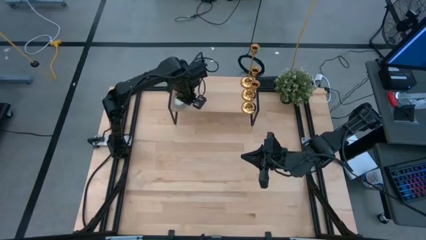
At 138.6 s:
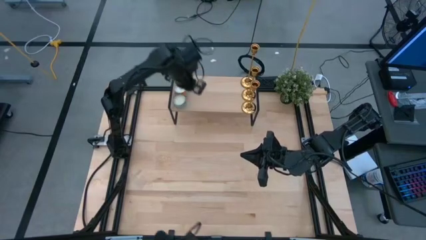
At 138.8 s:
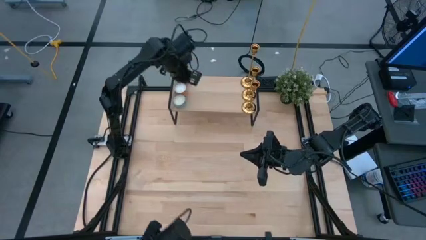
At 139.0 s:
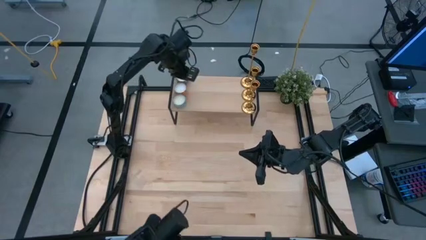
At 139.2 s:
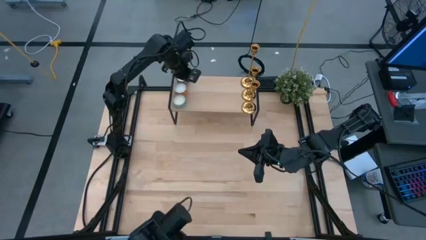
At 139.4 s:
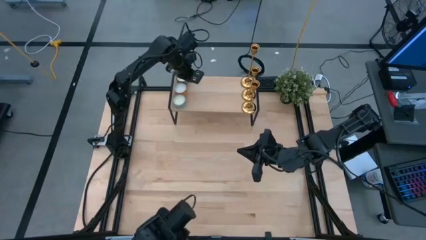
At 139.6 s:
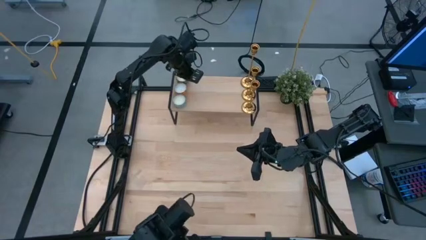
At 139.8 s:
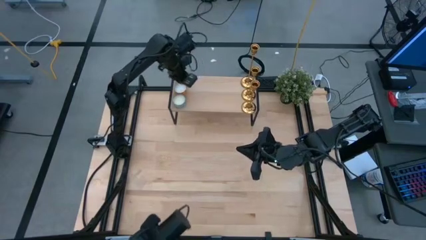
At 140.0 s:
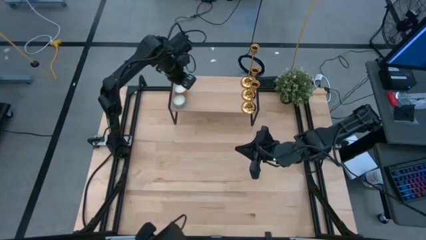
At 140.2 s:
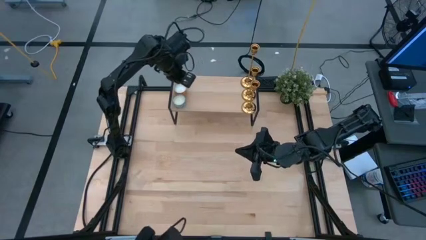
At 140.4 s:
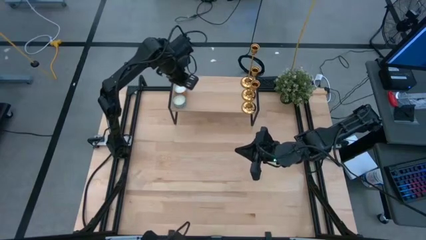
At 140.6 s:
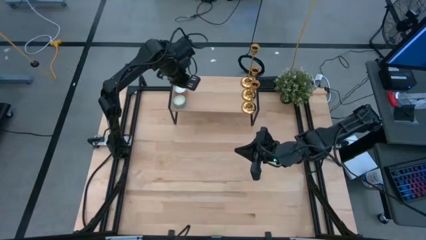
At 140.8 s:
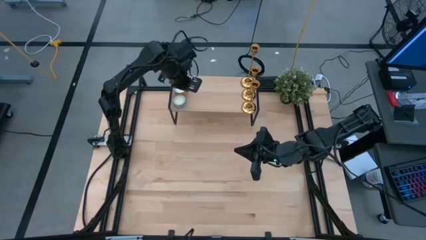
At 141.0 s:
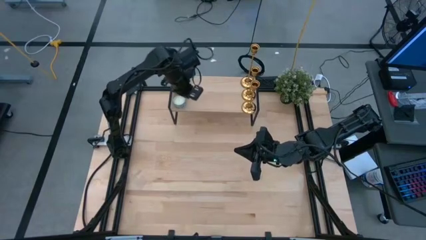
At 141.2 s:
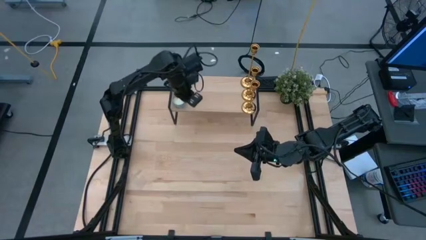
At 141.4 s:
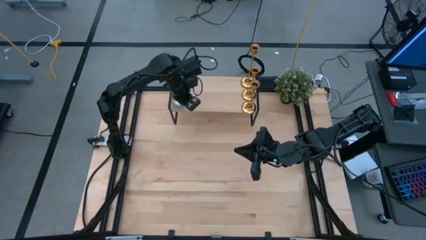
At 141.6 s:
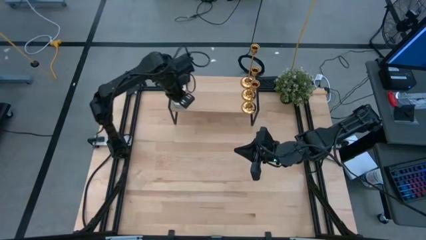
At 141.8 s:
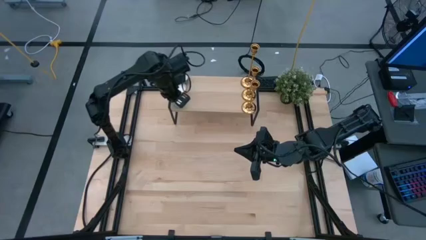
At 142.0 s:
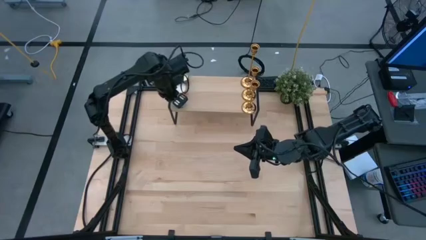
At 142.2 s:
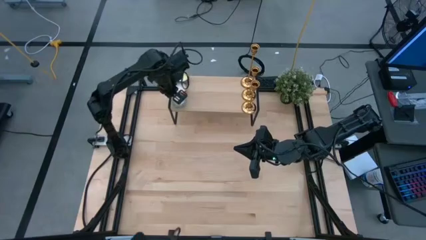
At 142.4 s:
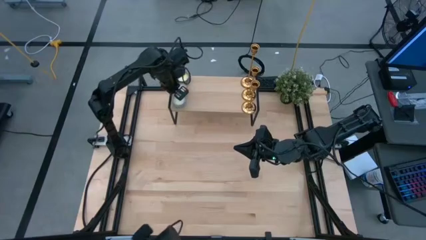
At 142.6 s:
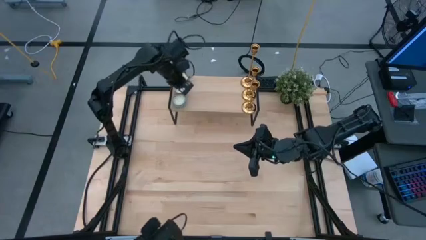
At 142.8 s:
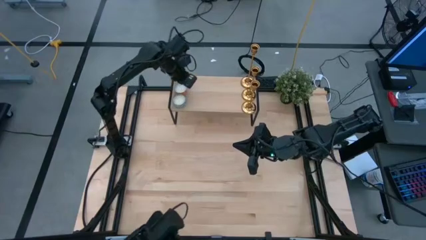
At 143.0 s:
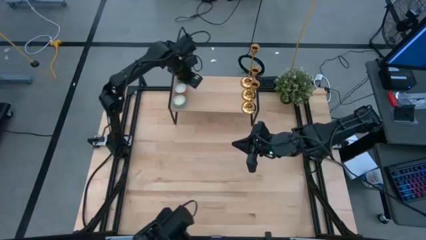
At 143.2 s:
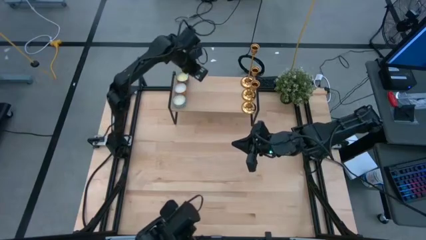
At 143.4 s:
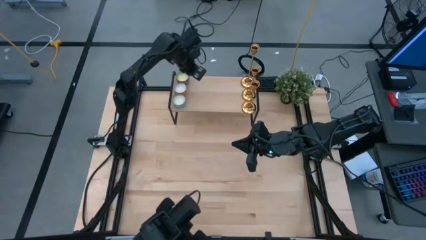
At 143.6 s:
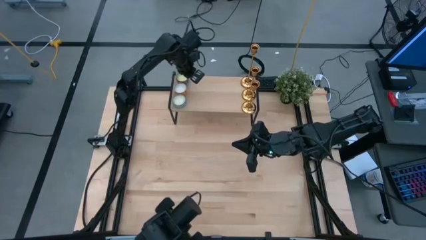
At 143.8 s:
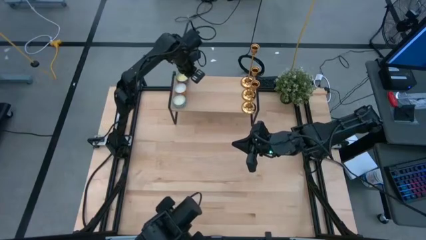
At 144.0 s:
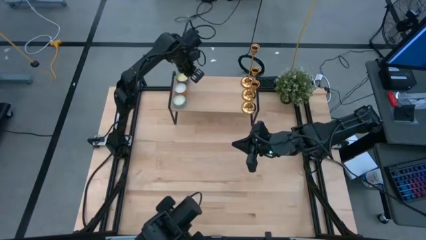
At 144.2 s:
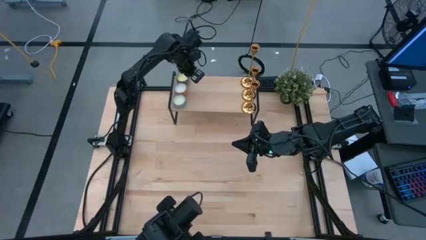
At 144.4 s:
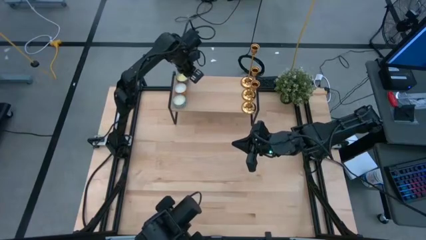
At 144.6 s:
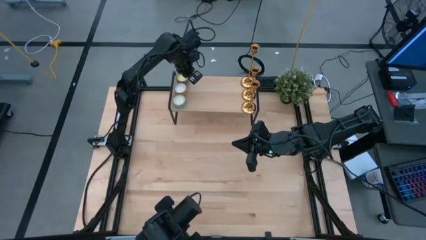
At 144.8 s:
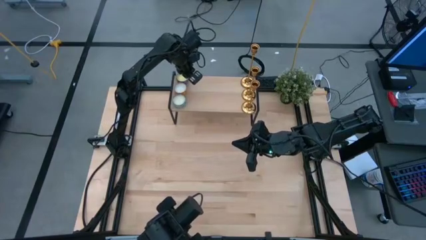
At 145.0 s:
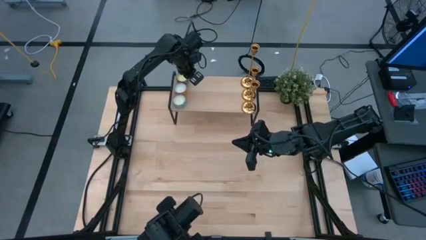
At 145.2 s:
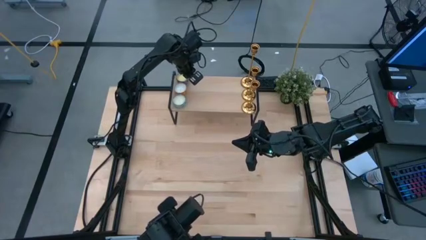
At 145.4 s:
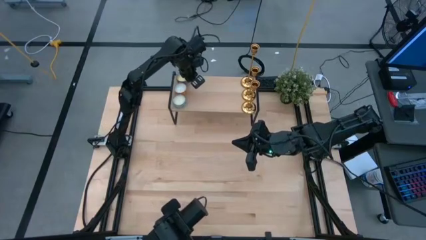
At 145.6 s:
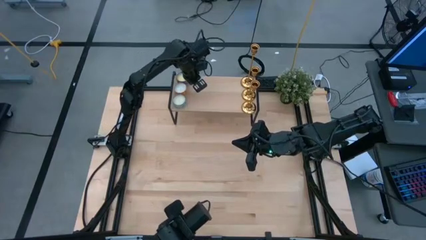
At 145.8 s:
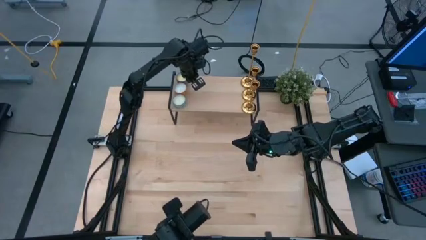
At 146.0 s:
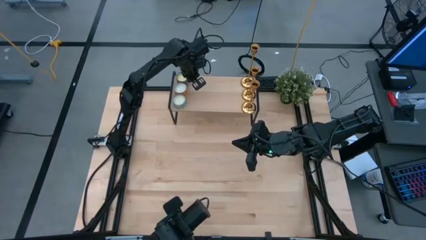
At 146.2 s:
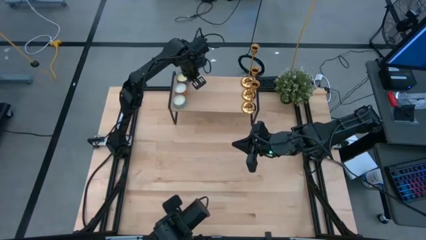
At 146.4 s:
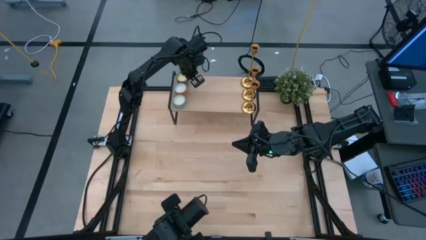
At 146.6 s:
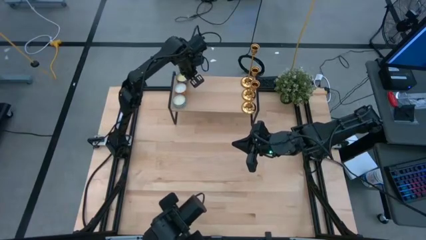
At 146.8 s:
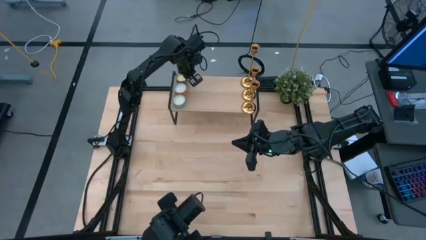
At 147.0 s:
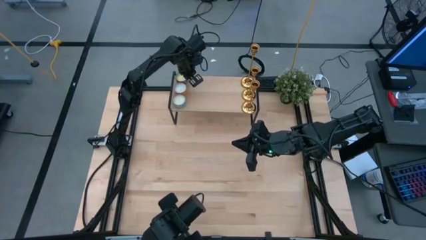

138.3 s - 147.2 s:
Task: Pick & Place candle stick holders
Adjust the black scented candle on the shelf

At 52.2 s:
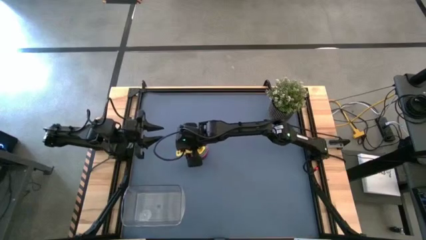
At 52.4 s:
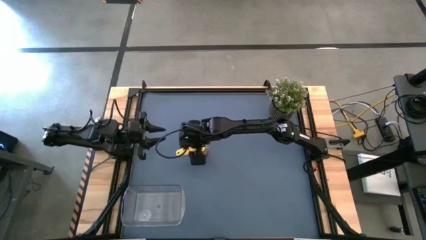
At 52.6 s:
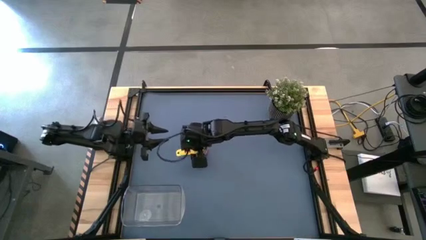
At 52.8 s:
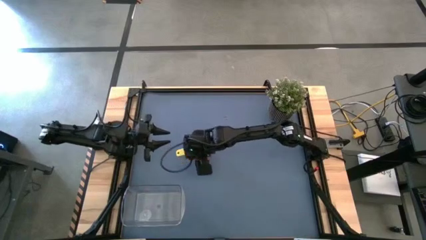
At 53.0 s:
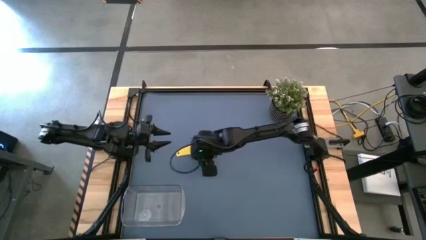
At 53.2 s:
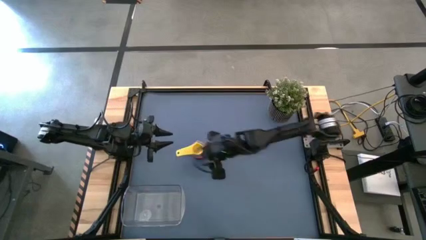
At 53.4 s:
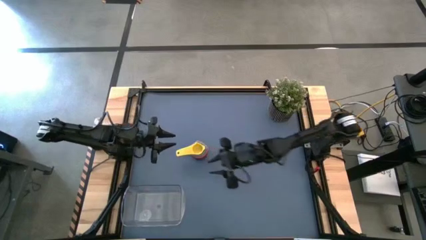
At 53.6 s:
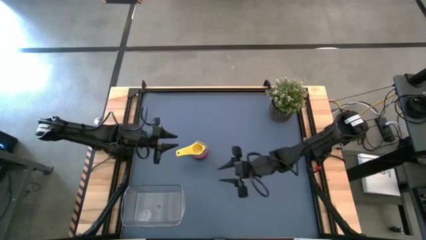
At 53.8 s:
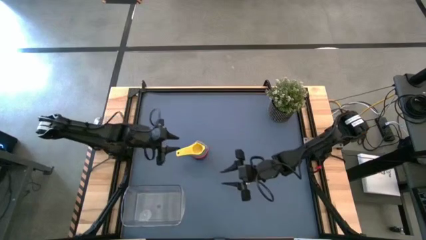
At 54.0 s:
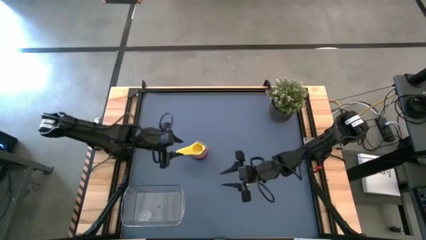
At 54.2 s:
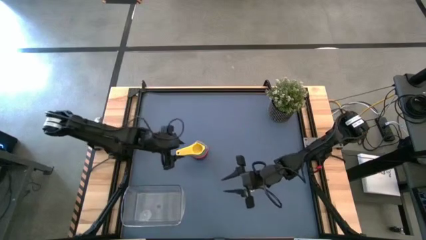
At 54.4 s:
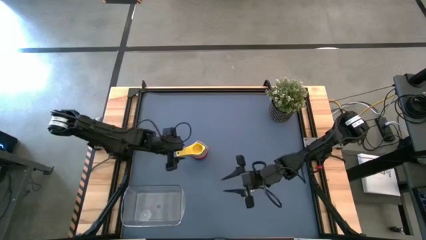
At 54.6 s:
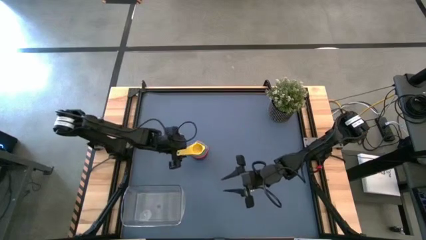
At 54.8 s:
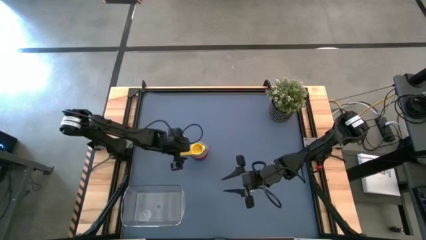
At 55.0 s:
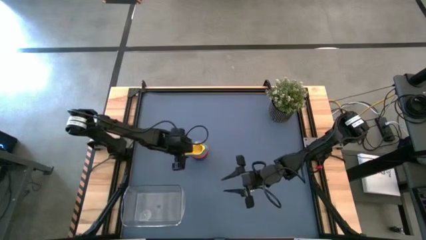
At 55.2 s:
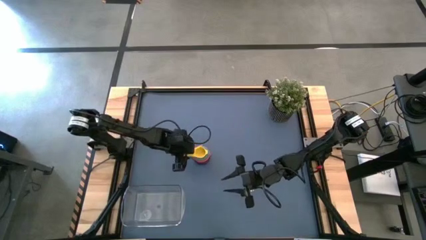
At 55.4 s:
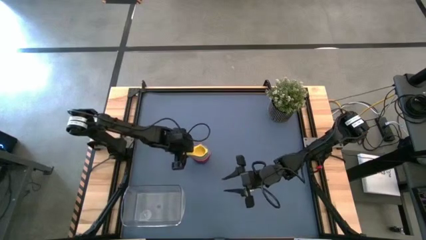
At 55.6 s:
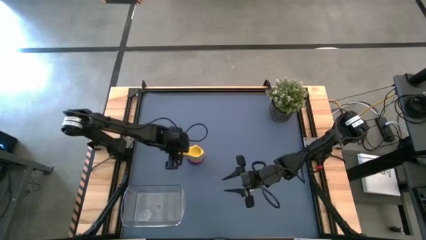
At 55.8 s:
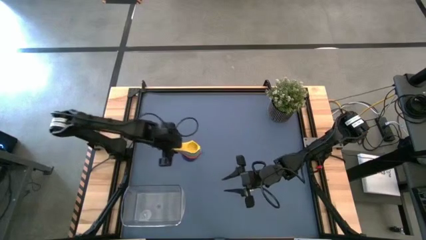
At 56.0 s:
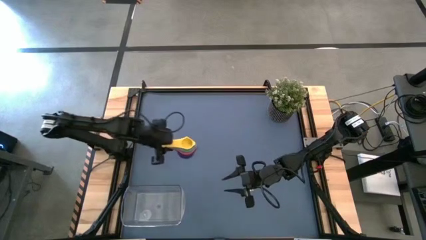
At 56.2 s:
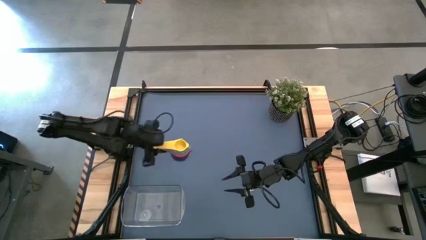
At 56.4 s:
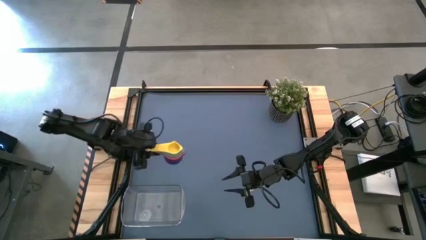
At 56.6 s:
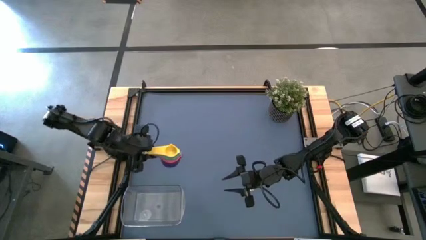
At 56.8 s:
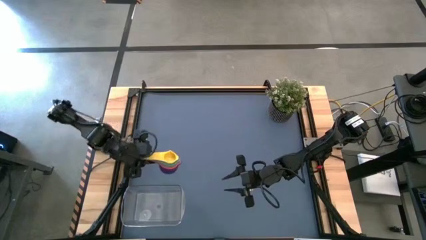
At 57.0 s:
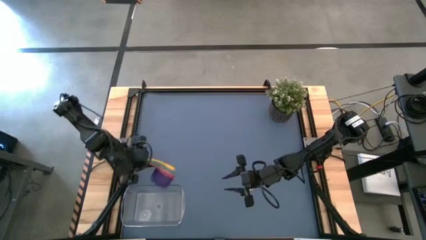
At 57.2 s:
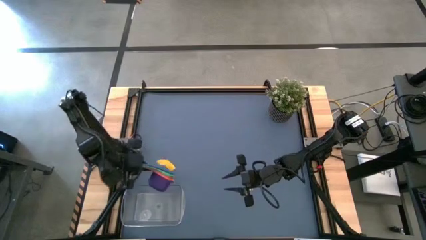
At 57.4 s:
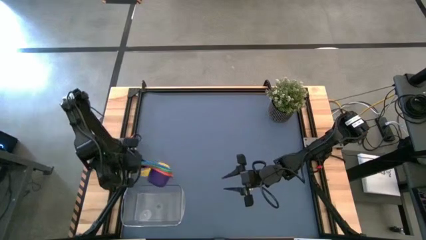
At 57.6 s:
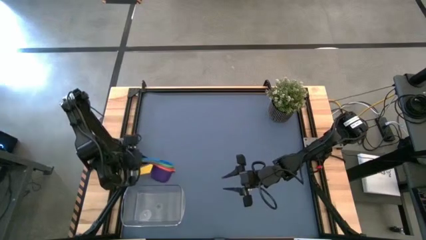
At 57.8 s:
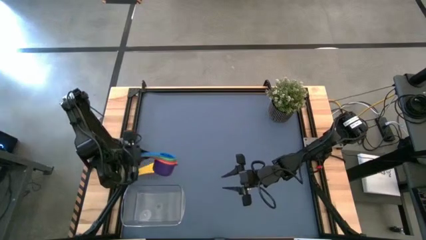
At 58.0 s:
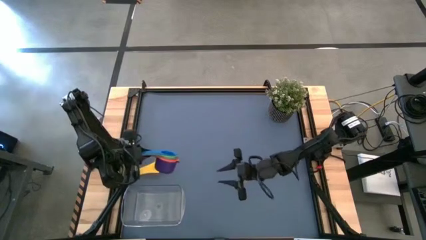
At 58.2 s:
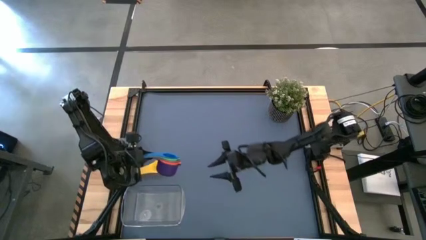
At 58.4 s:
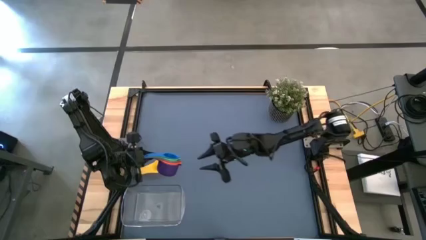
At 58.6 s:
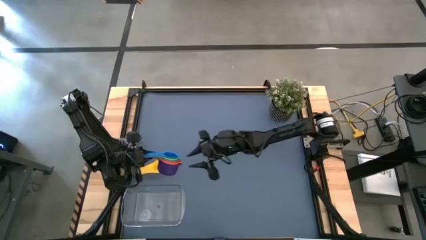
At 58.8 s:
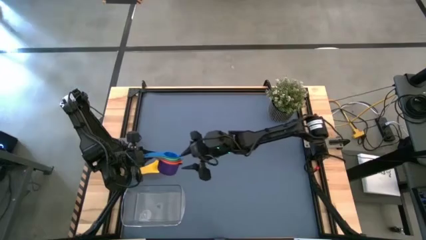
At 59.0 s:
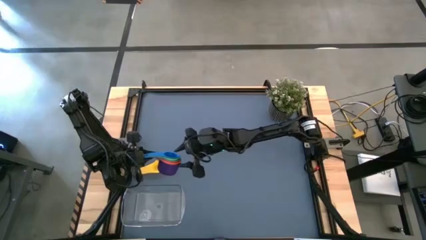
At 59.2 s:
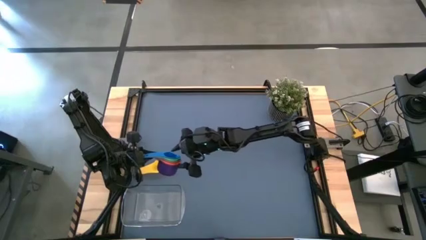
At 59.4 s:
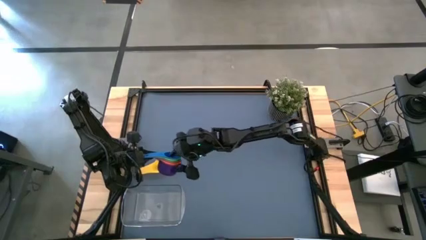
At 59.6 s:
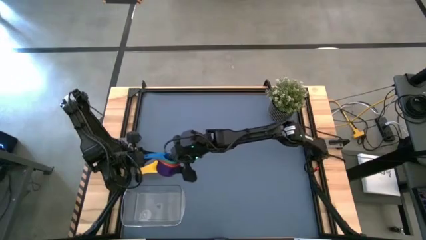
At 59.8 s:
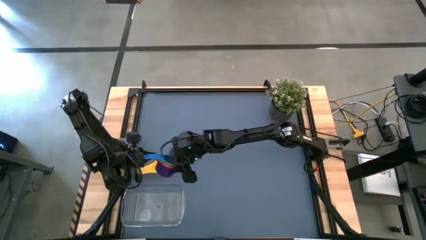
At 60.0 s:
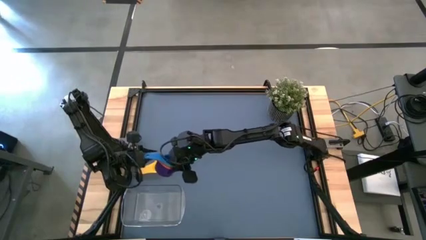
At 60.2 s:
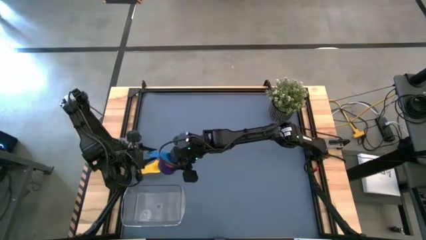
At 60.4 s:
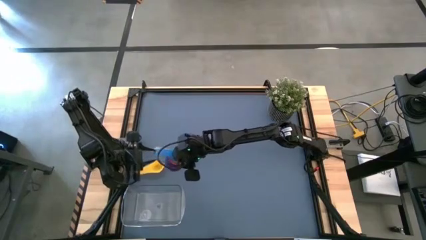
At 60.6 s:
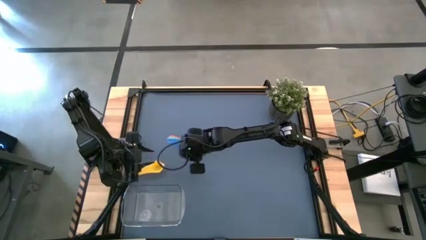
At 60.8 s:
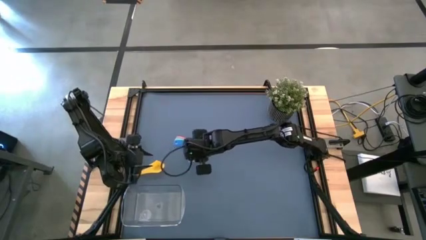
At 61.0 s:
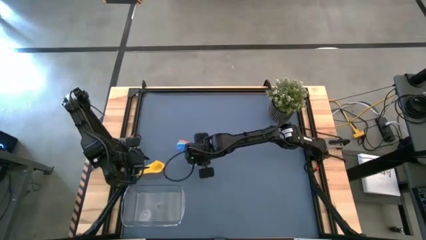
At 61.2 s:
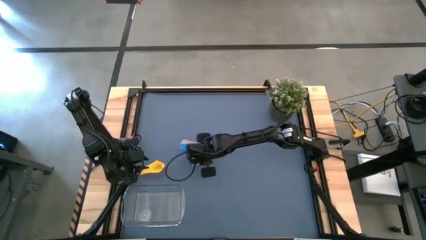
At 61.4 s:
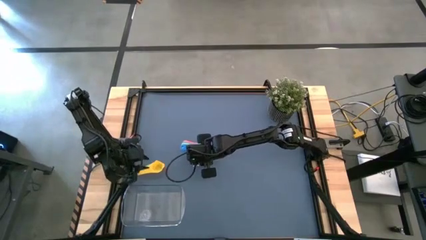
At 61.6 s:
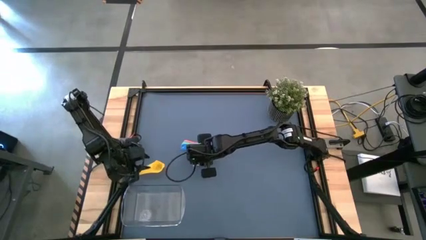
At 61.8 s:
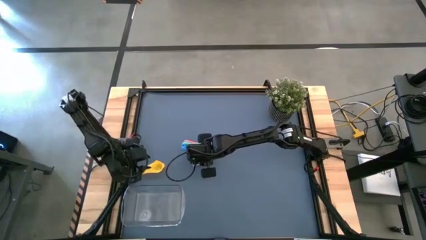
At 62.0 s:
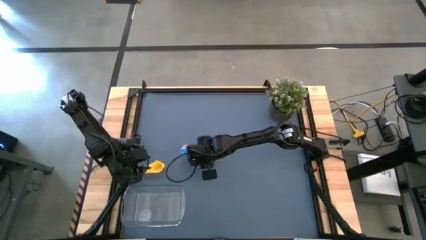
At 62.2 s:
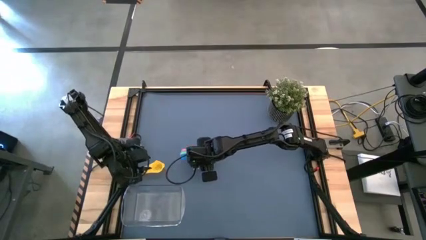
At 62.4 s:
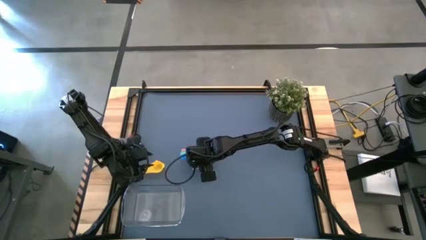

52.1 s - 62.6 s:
Task: Nest measuring cups in basket
Put the nested measuring cups into the transparent bin
